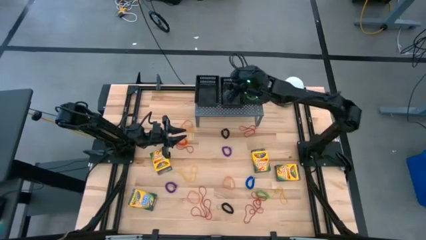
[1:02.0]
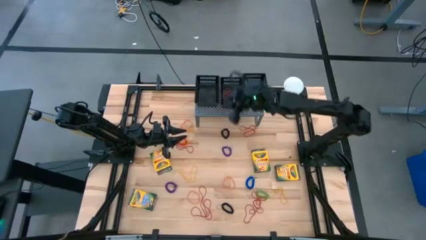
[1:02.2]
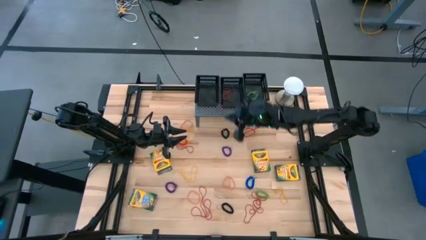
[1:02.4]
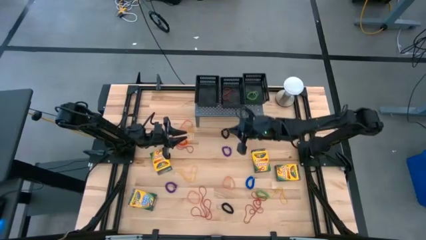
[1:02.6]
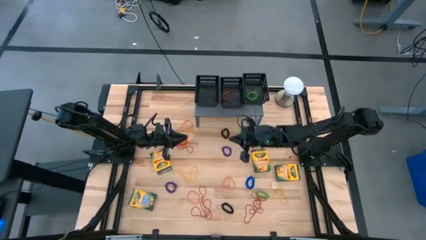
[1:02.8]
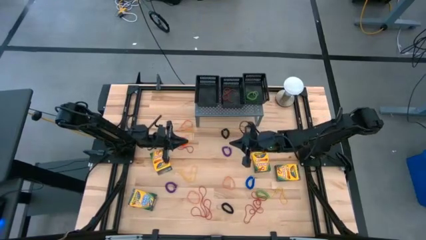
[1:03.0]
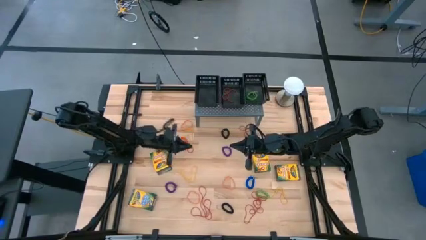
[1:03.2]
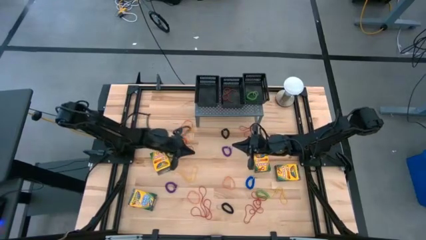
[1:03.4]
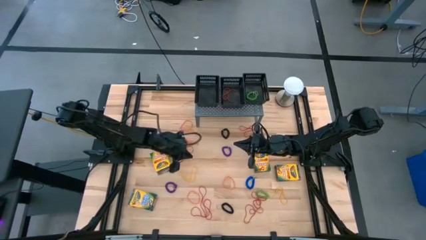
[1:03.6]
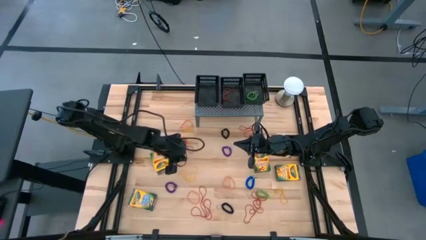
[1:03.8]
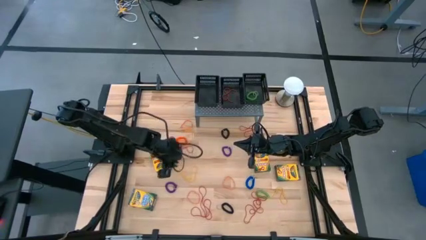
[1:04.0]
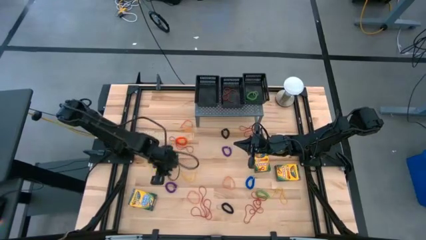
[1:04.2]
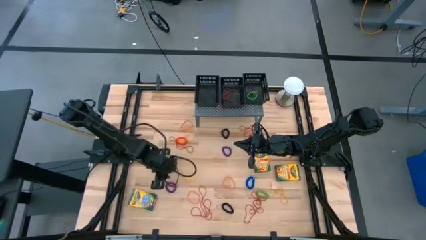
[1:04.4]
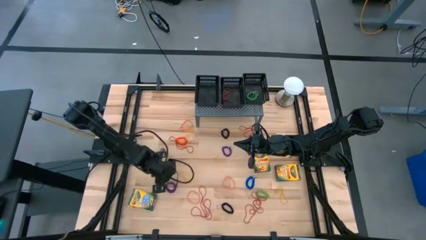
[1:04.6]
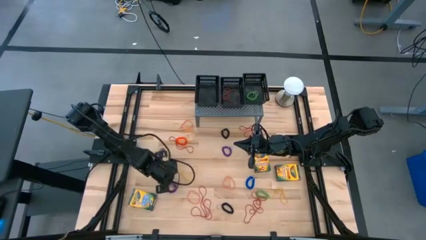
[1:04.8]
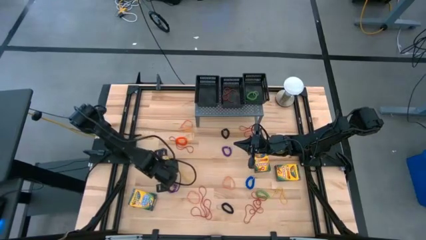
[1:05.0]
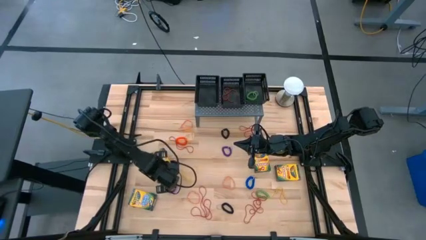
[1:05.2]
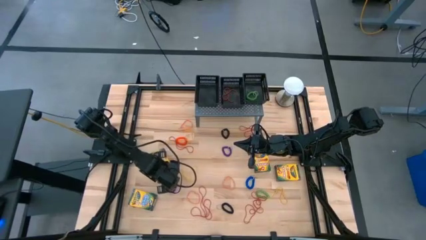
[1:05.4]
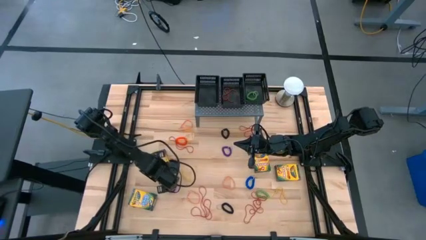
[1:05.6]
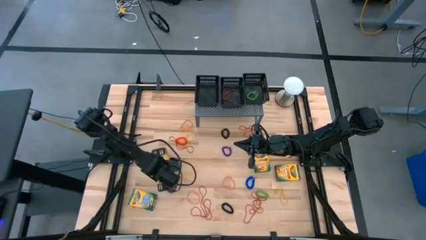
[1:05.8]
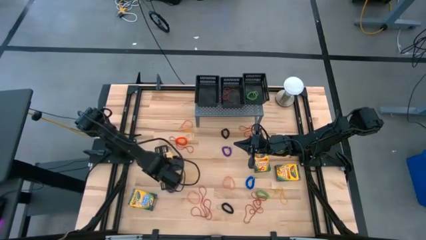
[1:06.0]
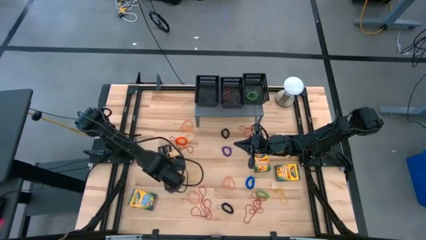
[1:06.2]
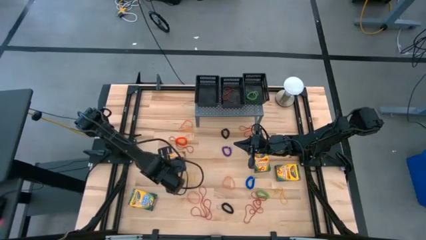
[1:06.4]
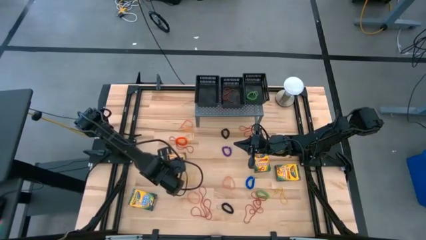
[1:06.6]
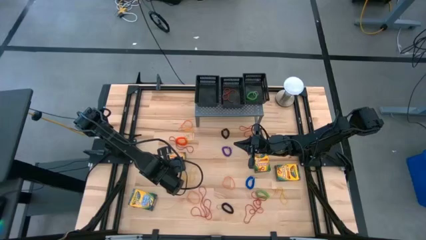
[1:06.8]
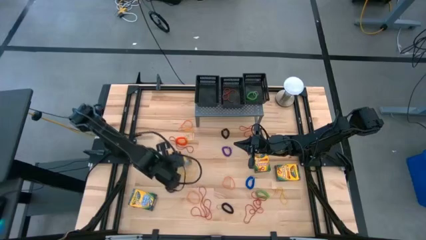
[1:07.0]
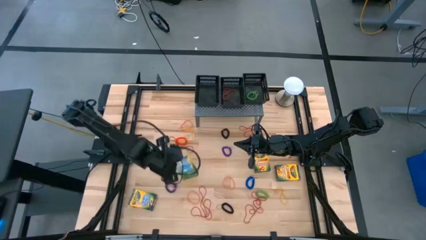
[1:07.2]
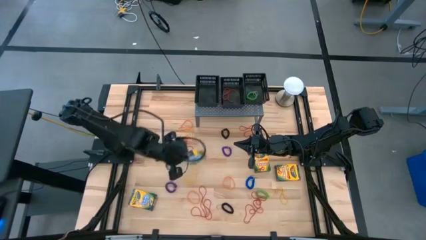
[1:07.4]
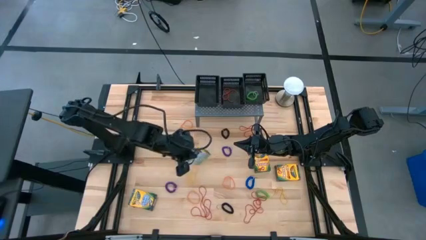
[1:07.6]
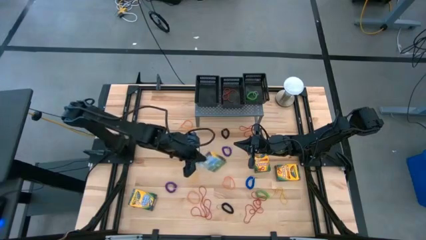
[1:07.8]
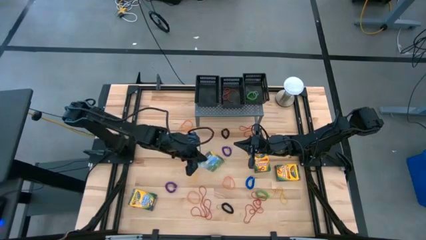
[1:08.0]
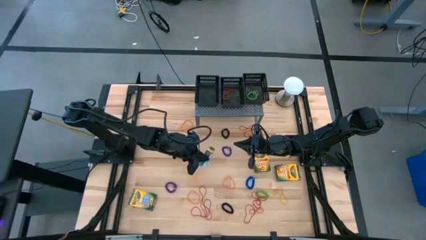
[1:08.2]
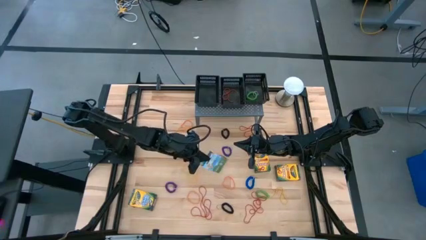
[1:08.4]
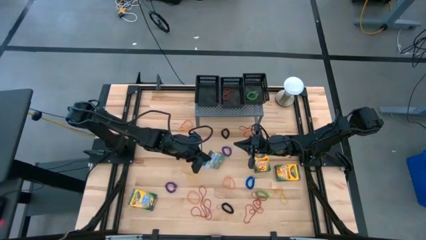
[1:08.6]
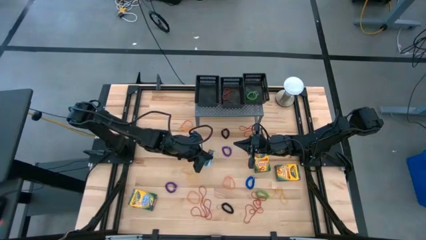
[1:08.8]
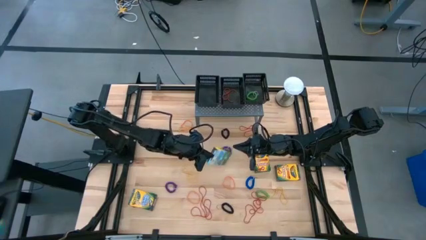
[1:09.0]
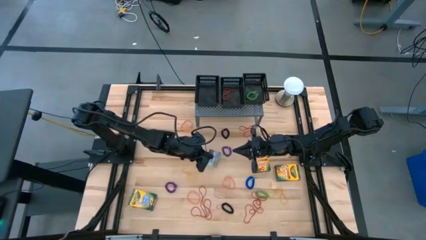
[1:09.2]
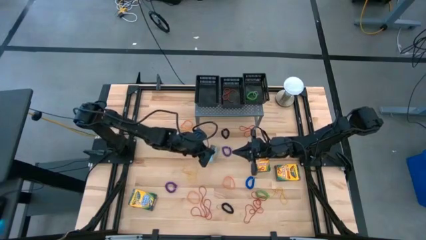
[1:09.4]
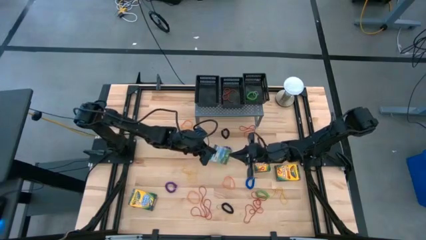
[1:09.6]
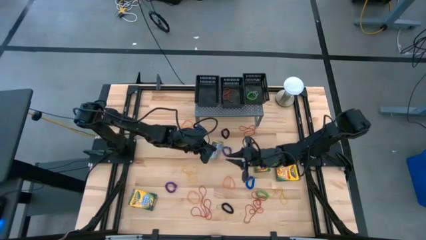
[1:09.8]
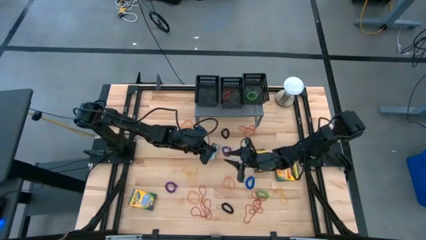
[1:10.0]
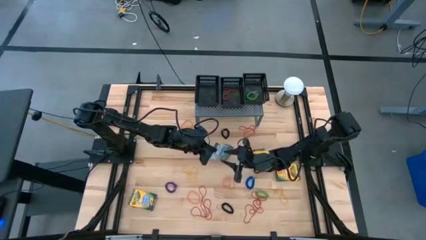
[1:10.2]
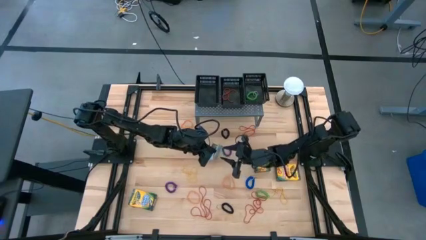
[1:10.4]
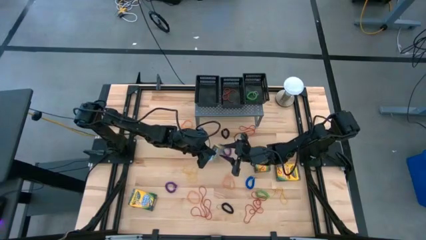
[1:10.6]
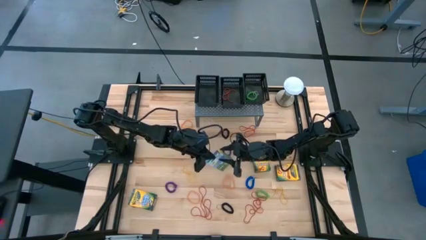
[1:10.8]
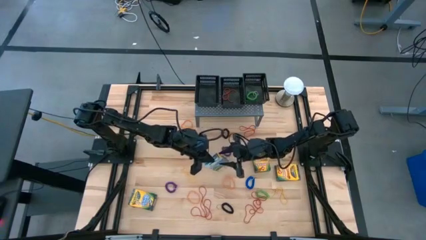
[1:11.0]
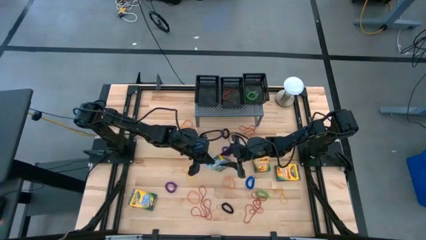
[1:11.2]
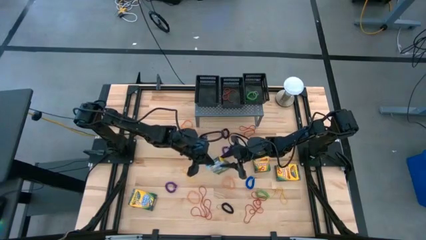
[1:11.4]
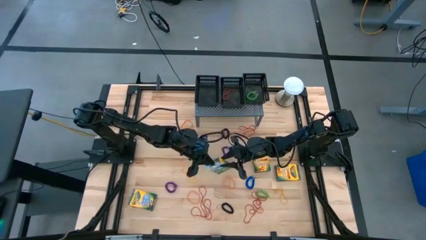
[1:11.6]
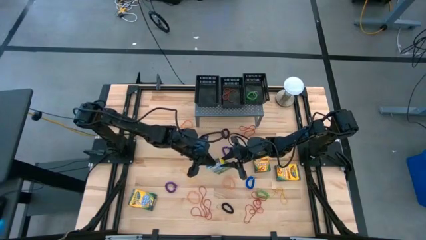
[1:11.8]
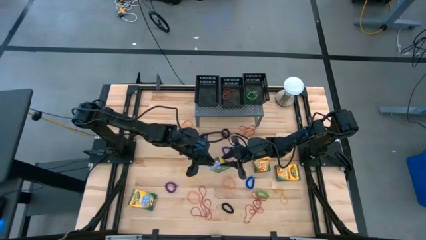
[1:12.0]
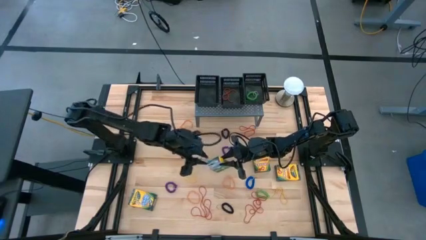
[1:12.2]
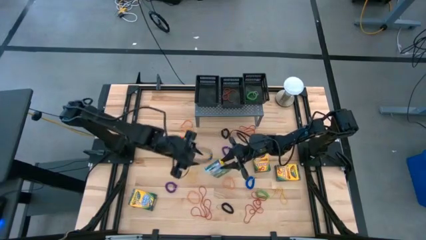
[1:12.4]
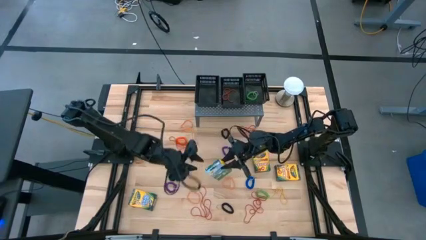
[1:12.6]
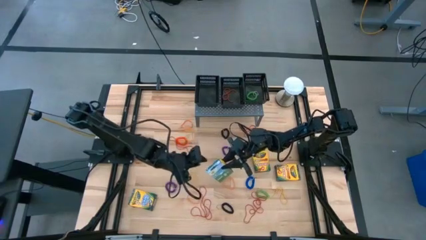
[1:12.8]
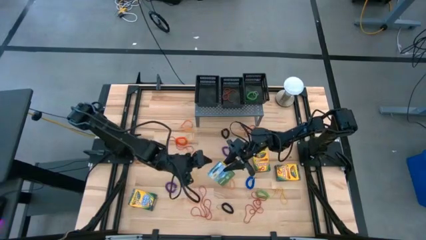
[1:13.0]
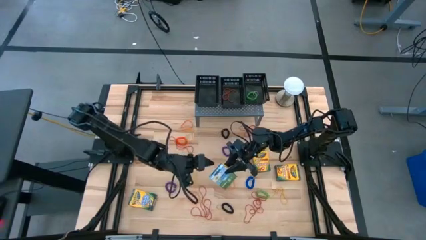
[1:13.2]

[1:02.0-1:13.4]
Task: Sort rubber bands into baskets
Put the crayon box into the left black basket on the shelf

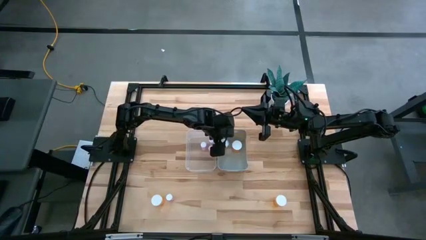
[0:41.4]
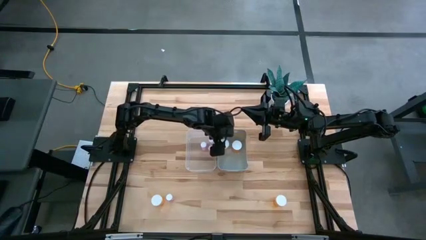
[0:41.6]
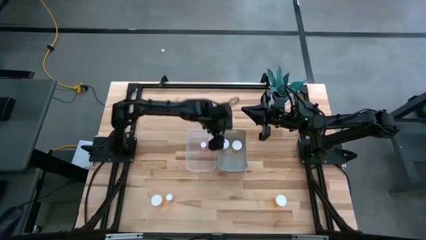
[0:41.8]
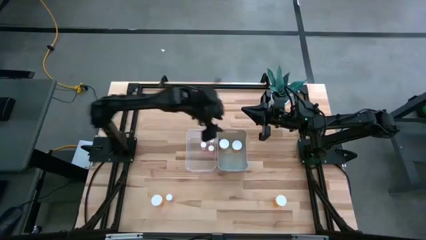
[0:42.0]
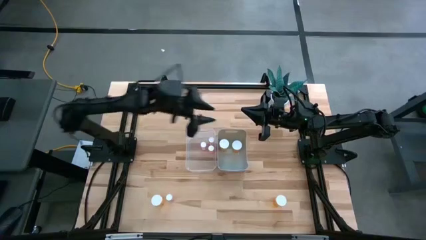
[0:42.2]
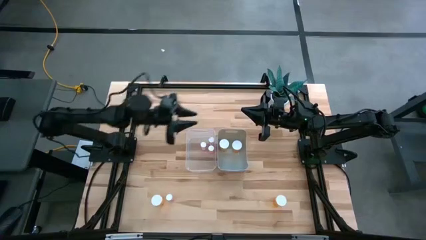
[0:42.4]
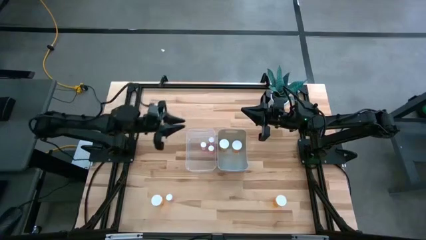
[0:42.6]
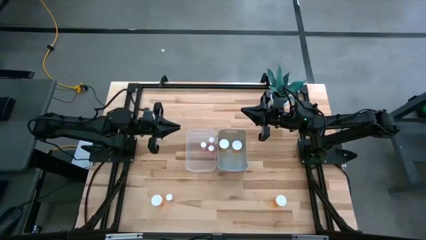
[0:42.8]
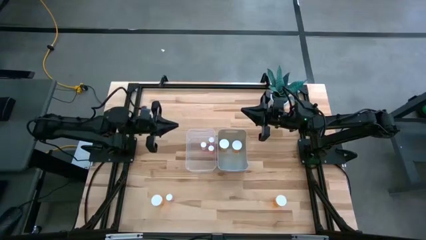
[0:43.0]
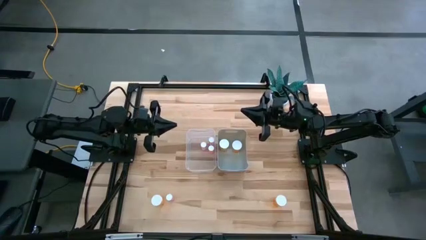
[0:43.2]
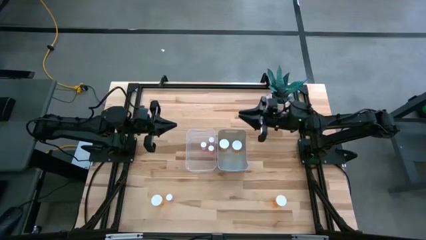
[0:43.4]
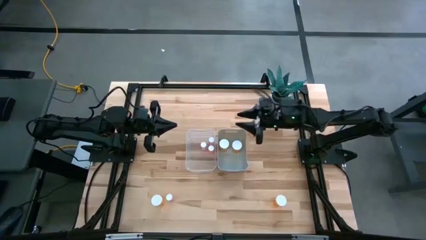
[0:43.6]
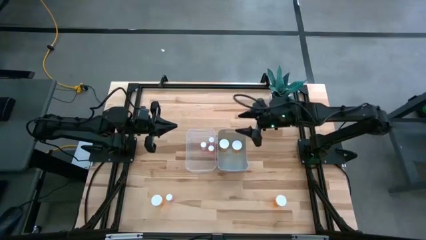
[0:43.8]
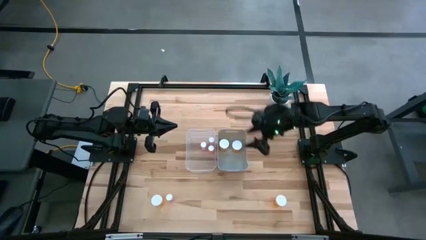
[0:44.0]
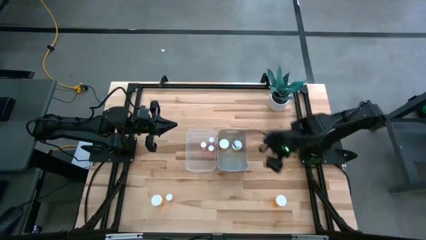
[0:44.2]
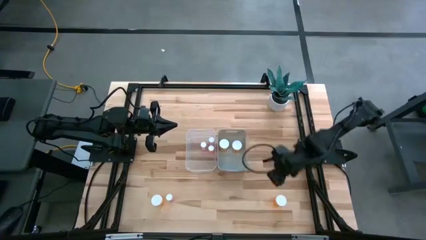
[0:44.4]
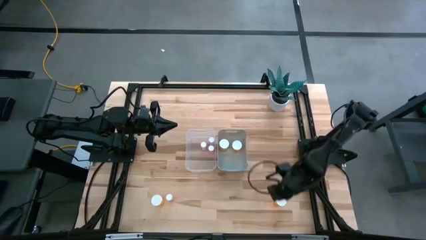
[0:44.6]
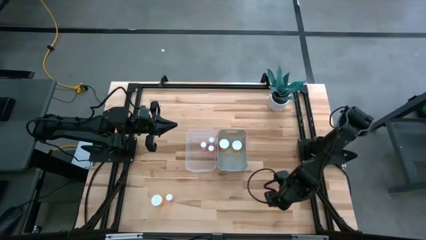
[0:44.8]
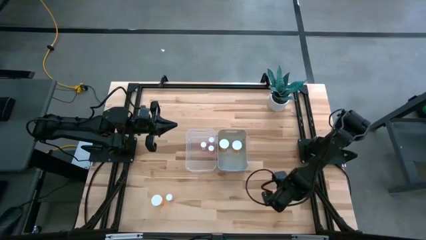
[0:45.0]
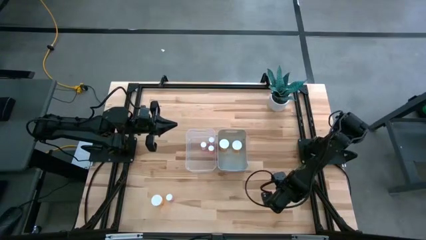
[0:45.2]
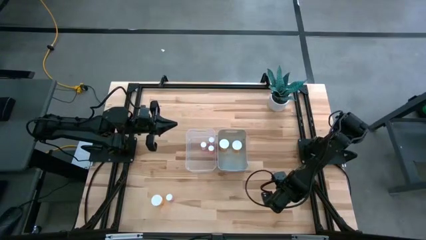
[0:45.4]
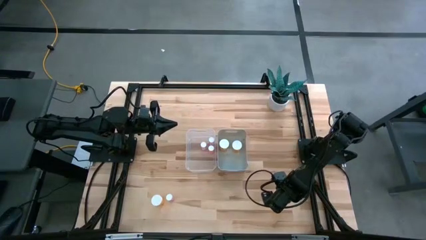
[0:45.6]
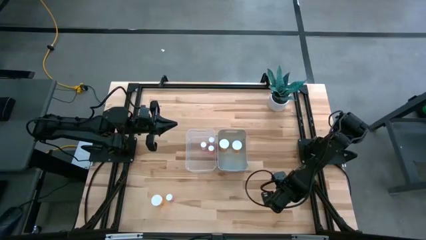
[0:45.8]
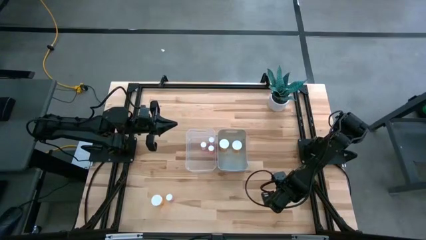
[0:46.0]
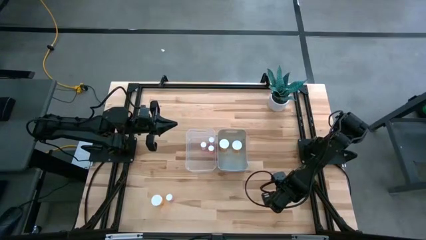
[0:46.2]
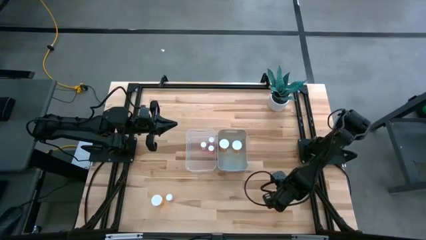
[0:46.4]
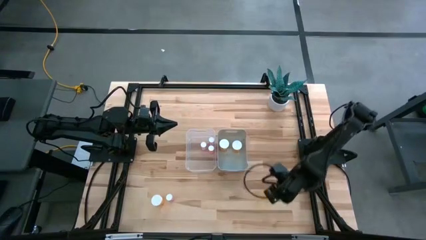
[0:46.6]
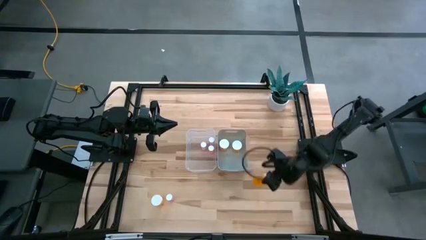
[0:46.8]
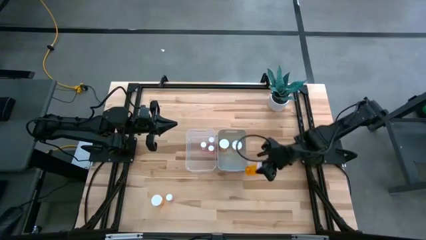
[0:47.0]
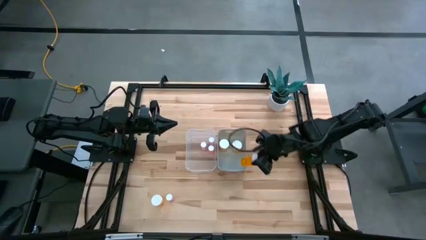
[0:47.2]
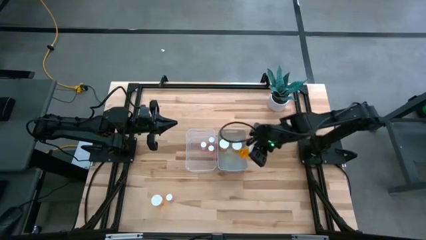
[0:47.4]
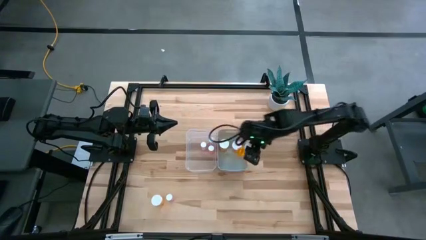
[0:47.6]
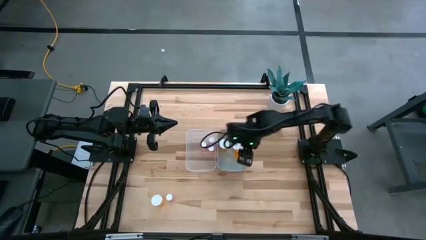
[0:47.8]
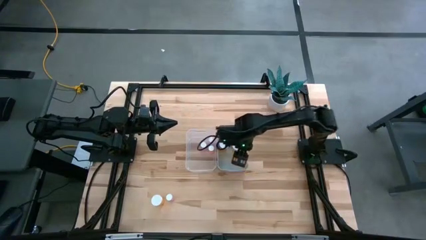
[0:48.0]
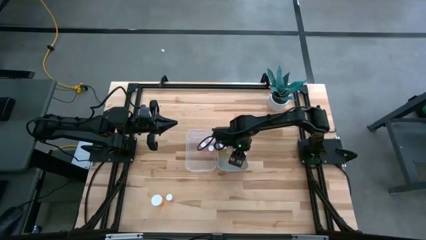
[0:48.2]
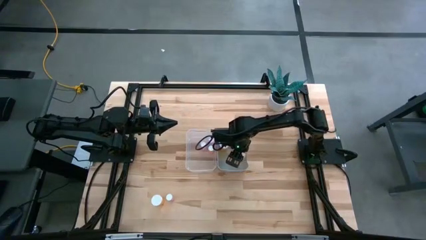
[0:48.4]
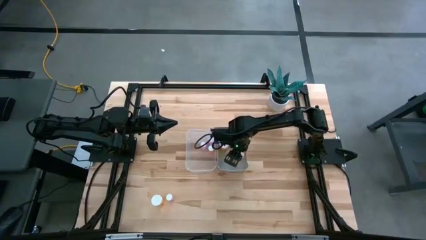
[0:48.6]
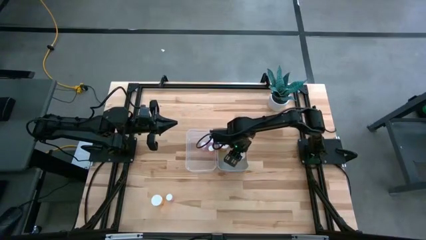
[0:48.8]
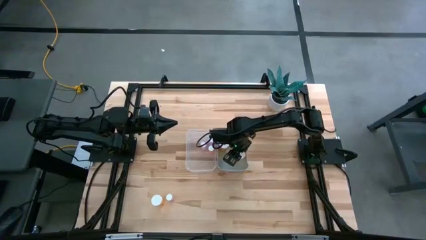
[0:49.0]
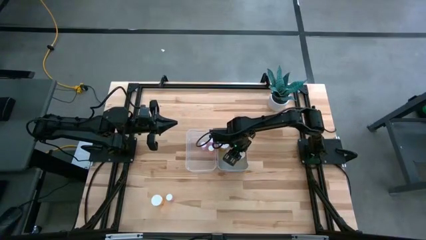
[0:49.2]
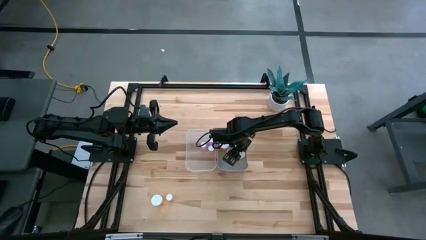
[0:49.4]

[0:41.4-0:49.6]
Task: Pick and place medicine bottles into bin by pill shape (circle, oval)
Put the large orange pill bottle into the gray bin
